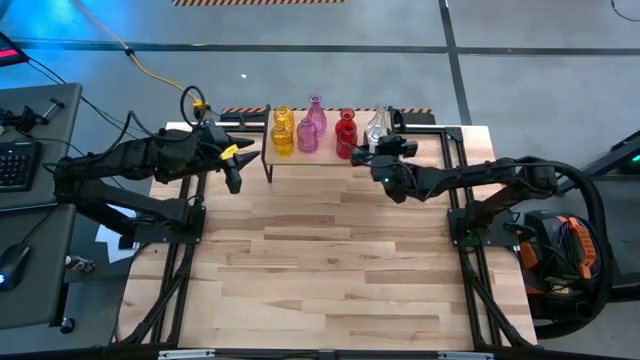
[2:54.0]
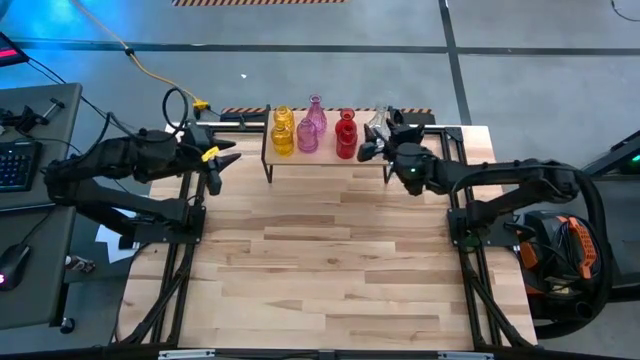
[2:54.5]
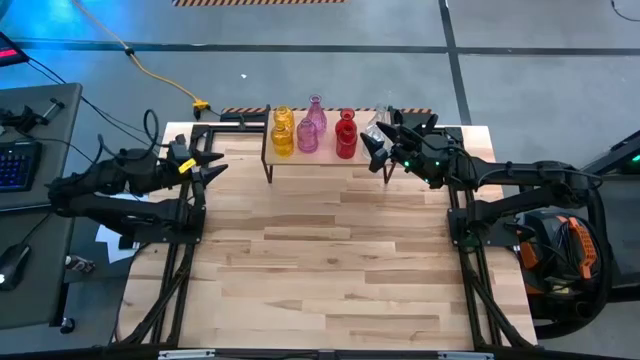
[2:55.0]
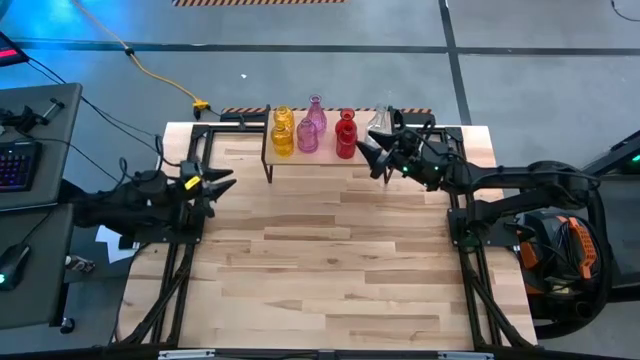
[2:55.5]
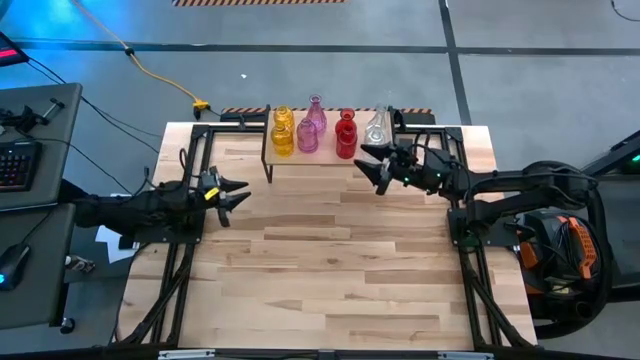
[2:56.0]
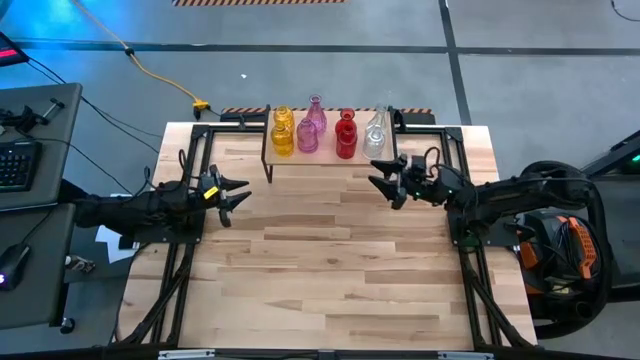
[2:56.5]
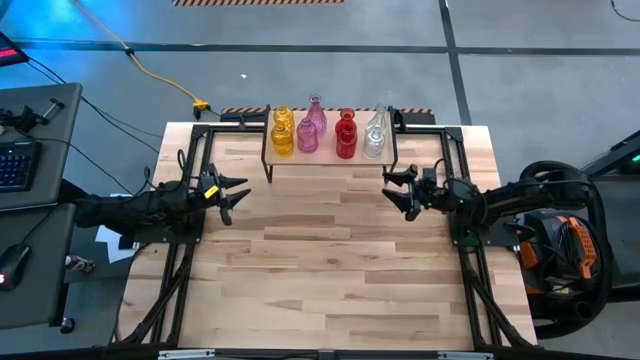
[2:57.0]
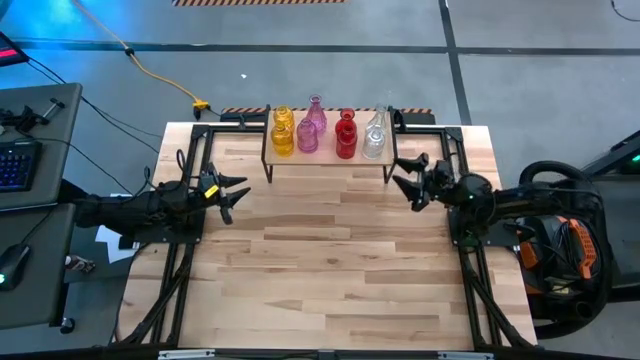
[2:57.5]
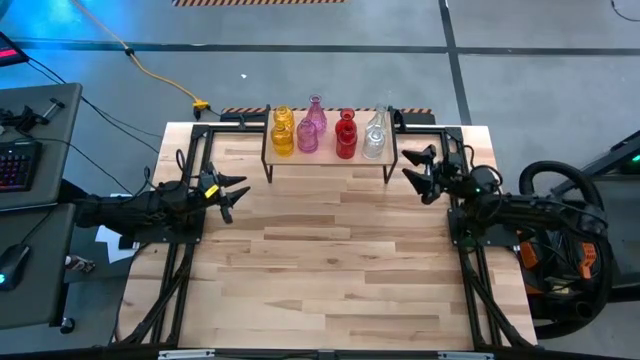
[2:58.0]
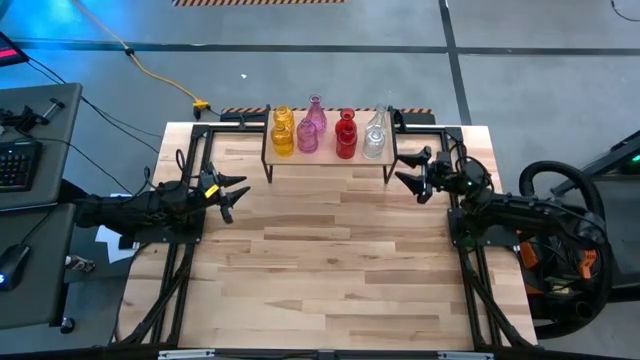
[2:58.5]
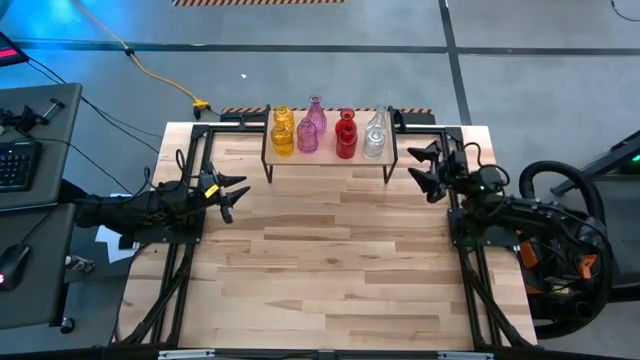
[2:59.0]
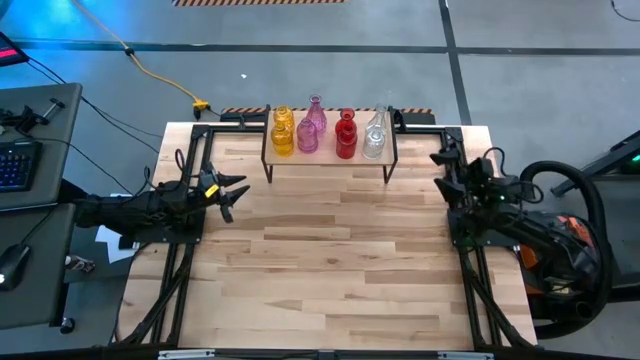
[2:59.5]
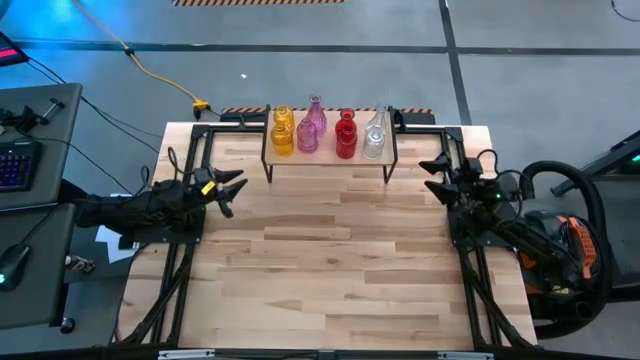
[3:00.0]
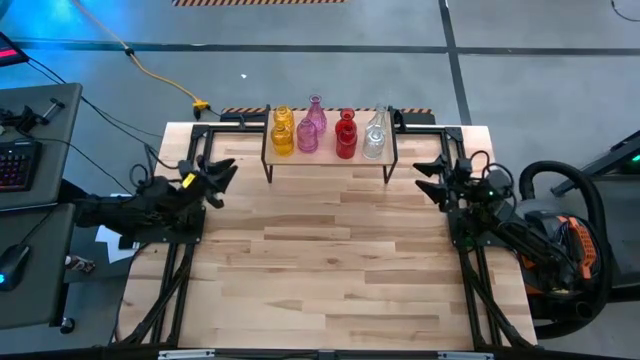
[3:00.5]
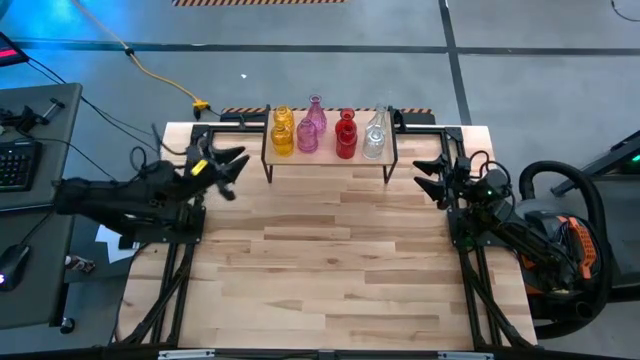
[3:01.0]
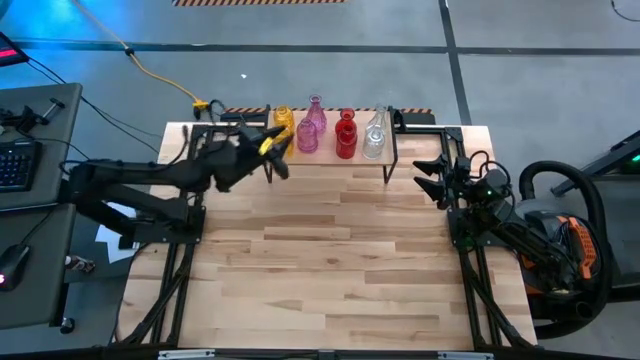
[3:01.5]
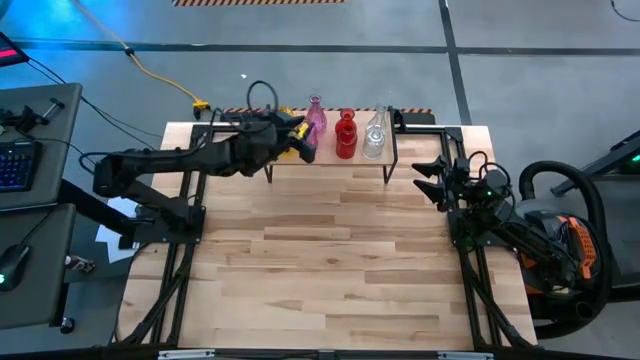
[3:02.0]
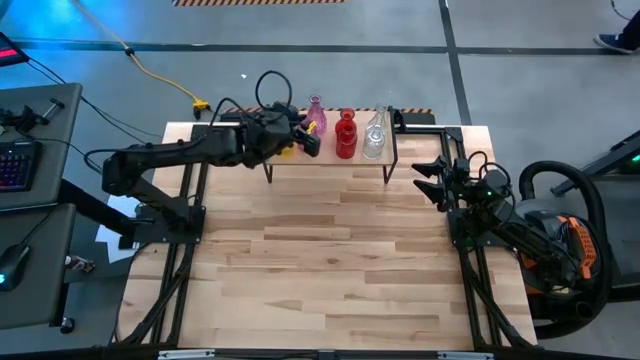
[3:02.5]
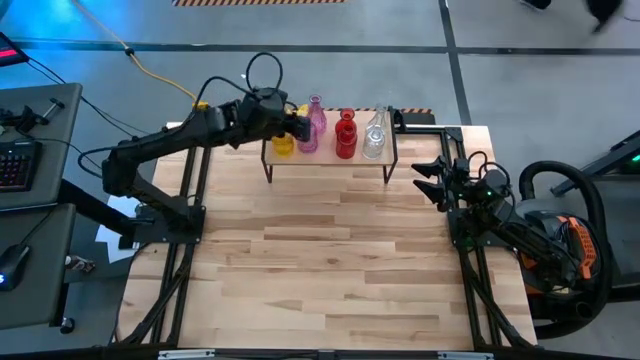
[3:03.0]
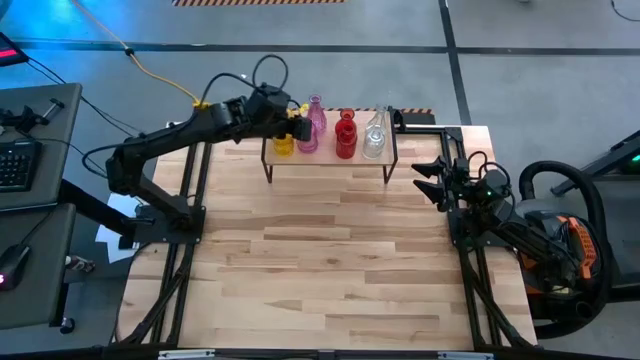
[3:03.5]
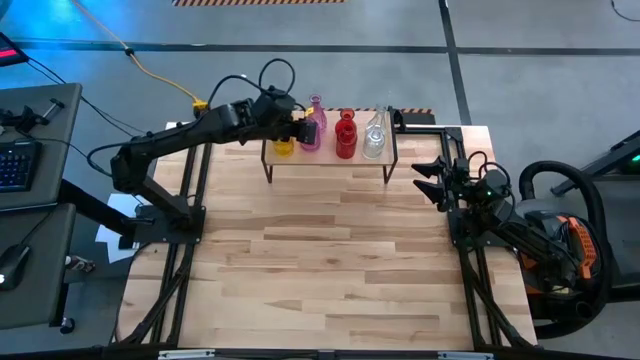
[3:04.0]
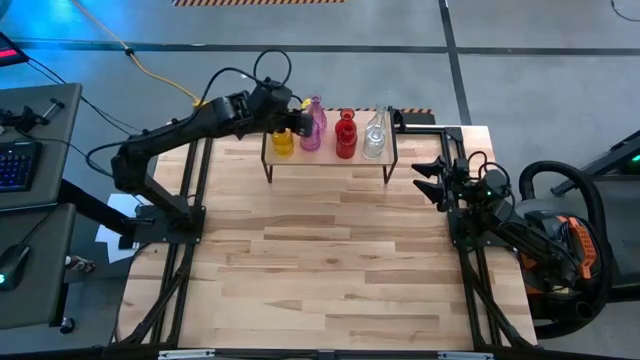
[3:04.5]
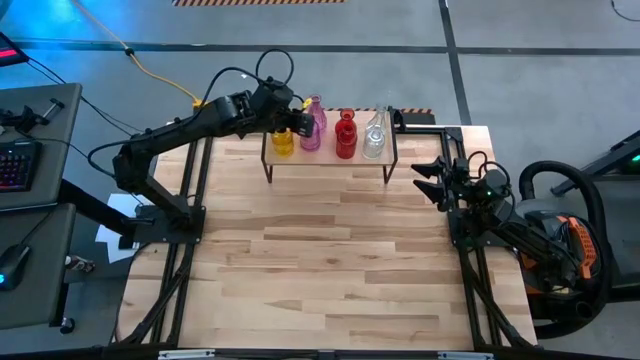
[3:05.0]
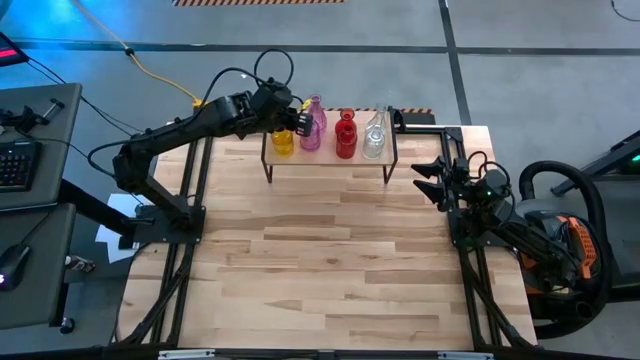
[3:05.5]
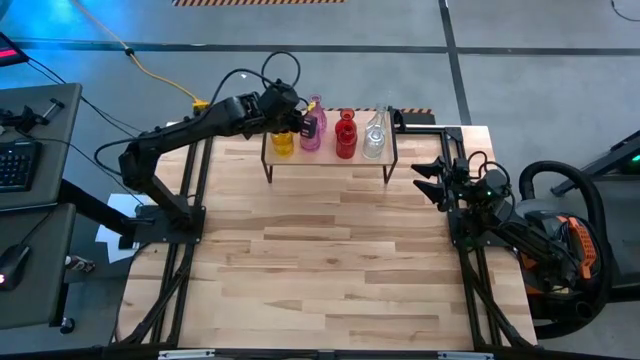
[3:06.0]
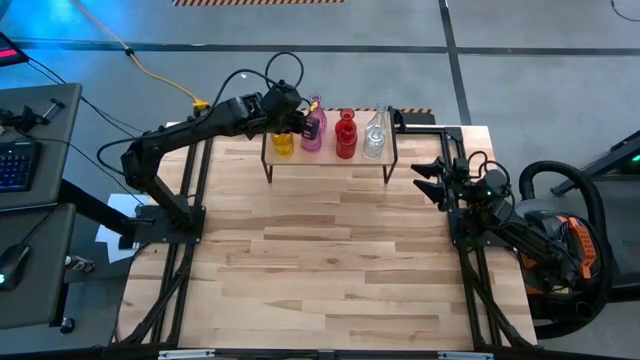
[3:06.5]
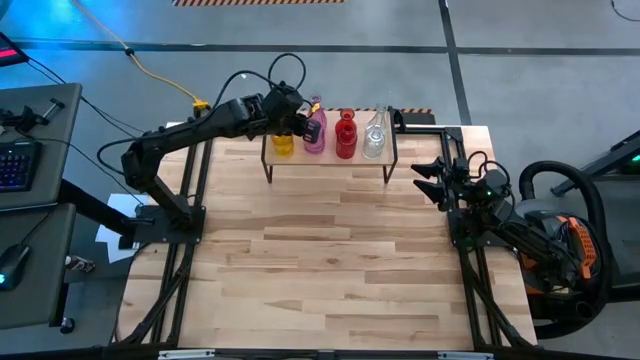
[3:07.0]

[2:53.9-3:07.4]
Task: sort vases onto shelf
Adjust the pink vase

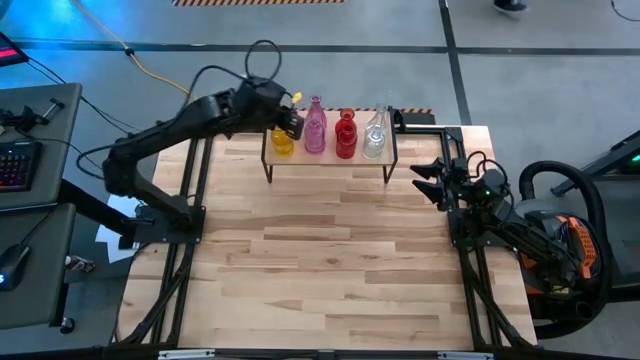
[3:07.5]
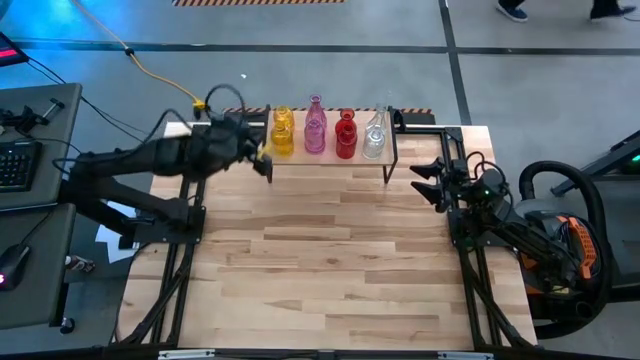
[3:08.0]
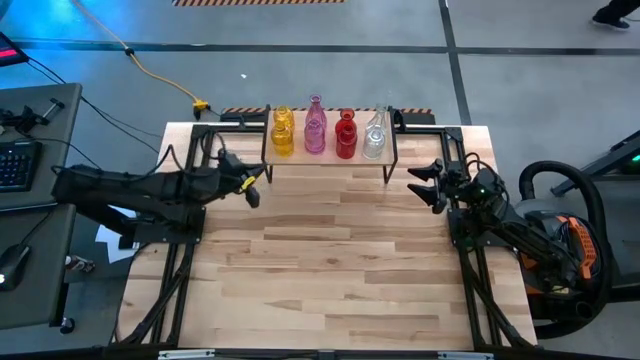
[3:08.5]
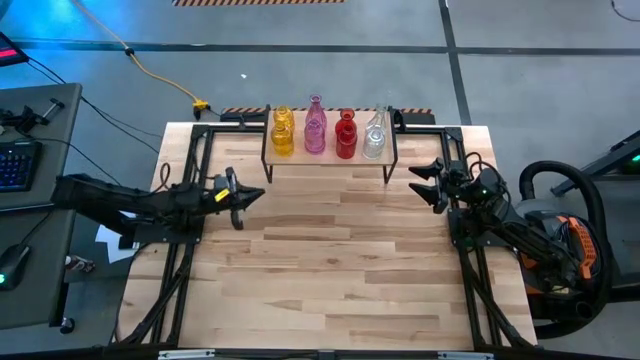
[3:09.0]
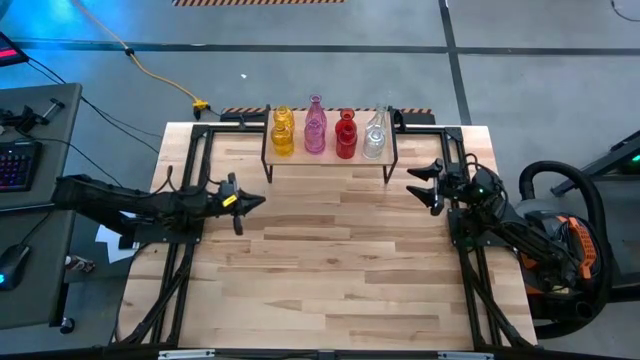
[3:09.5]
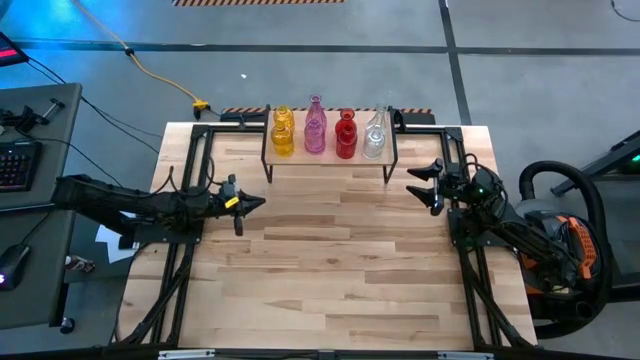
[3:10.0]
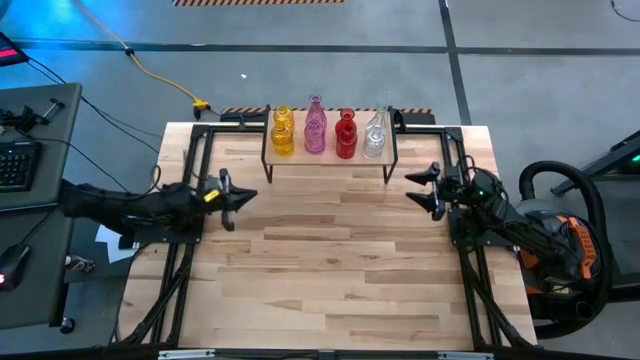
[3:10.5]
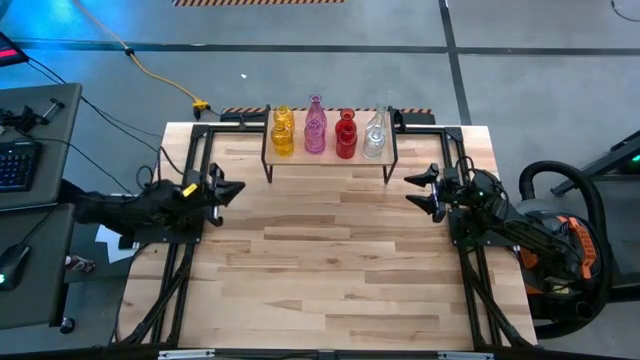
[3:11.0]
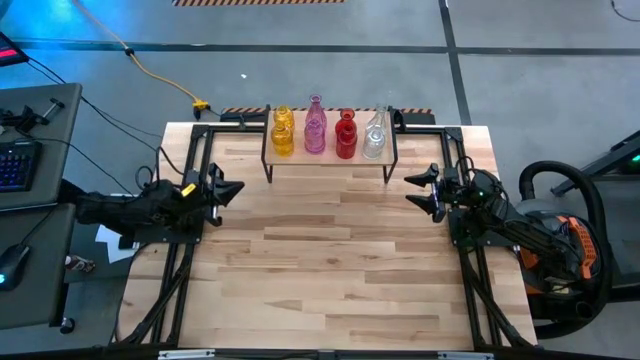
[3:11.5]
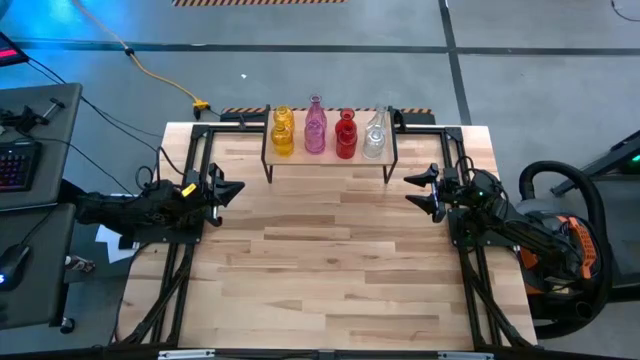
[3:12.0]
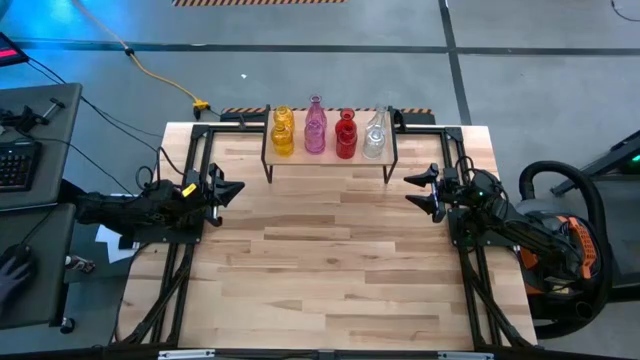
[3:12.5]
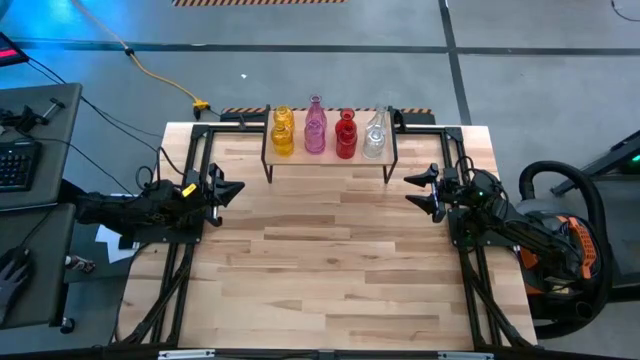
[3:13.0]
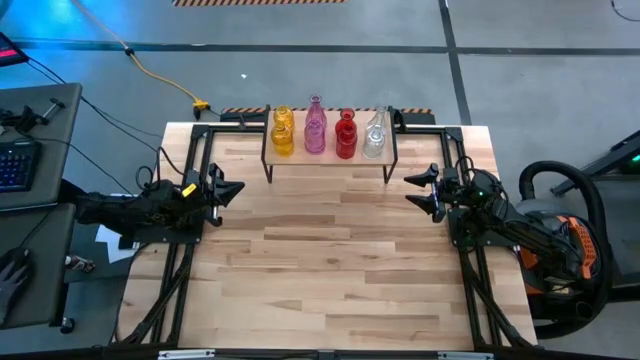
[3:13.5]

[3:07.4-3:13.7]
Return to Home Position
